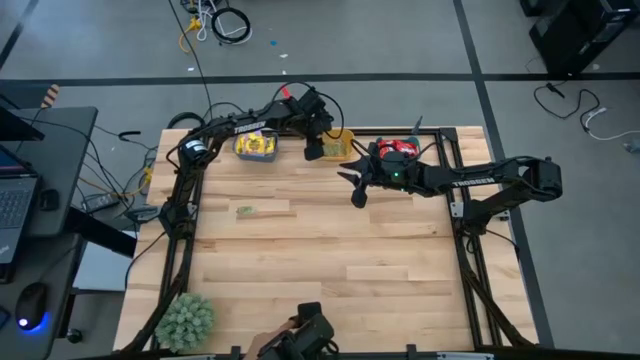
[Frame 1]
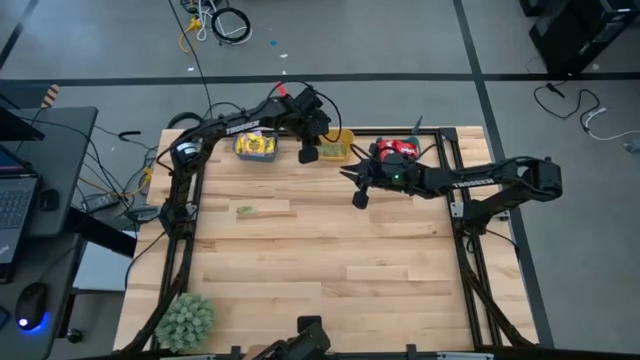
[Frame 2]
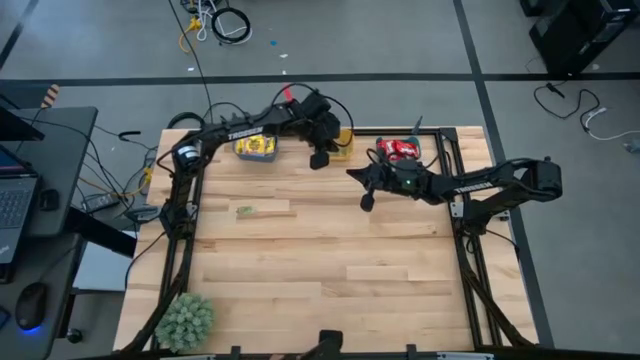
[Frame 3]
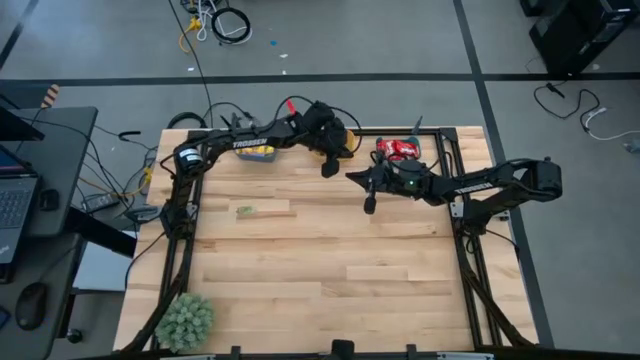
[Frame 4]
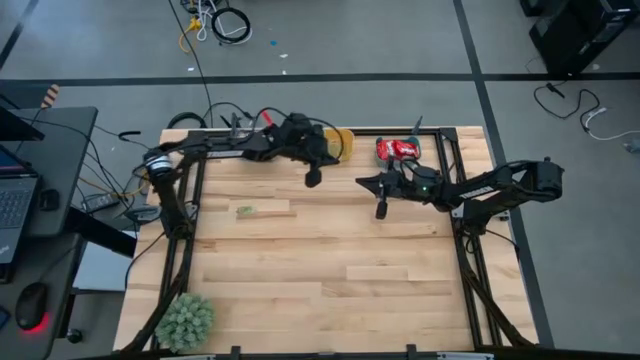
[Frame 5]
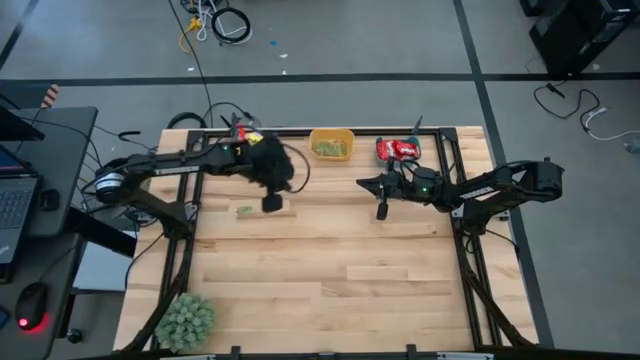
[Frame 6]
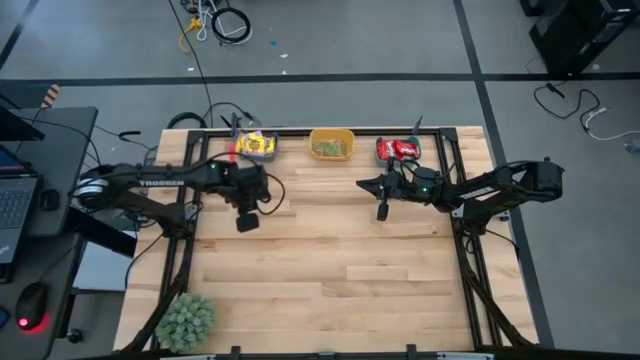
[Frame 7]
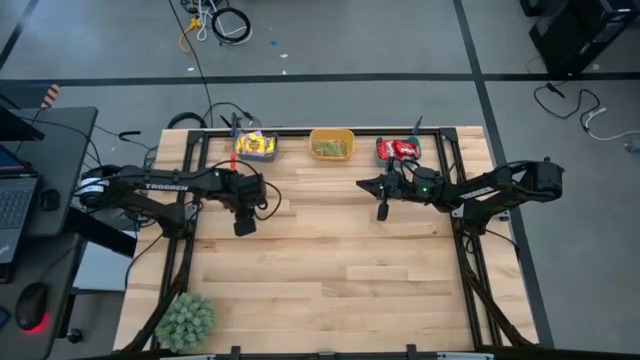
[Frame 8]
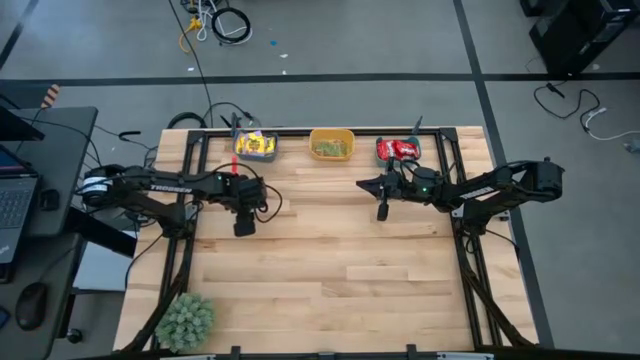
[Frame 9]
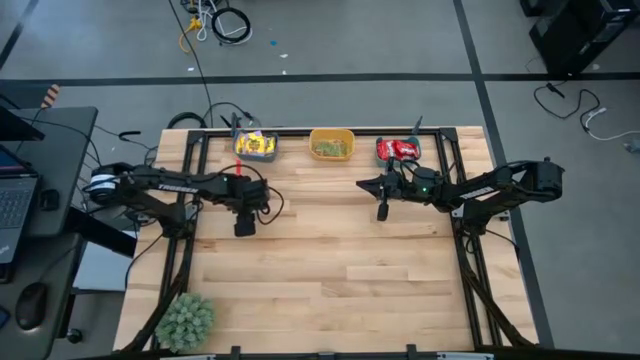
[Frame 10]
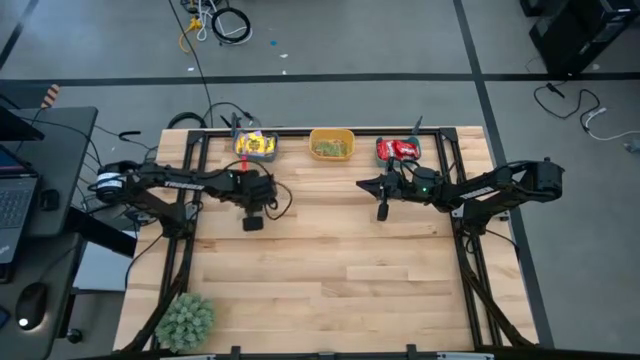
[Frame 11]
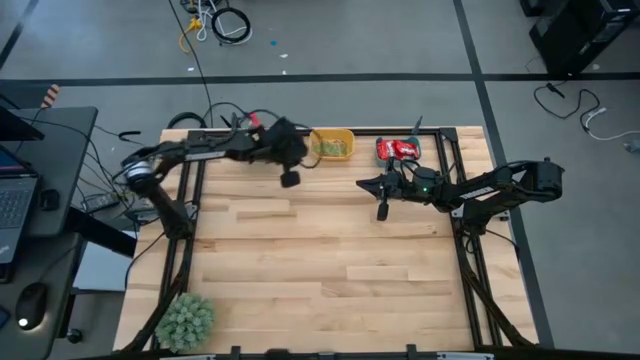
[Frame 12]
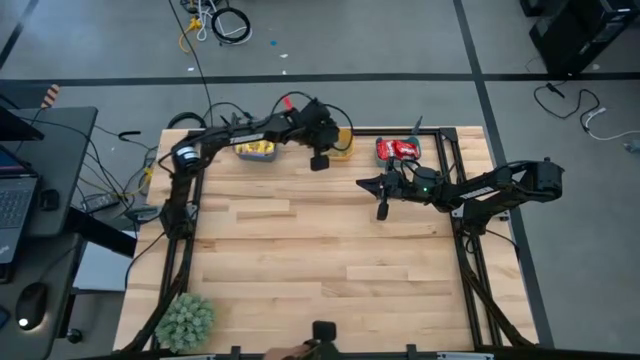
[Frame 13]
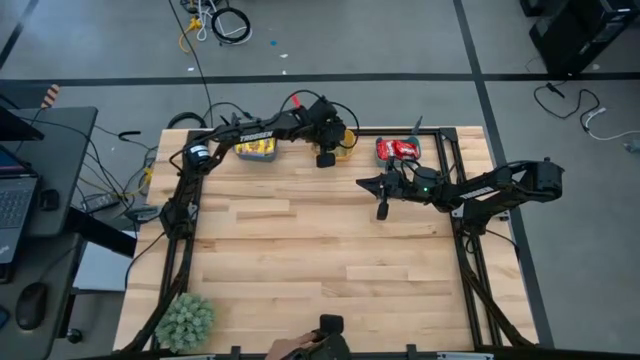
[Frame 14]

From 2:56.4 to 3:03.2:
Task: Sort candy
Put the green gummy into the yellow bin

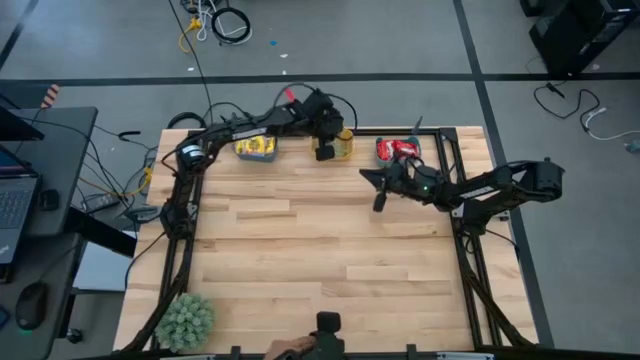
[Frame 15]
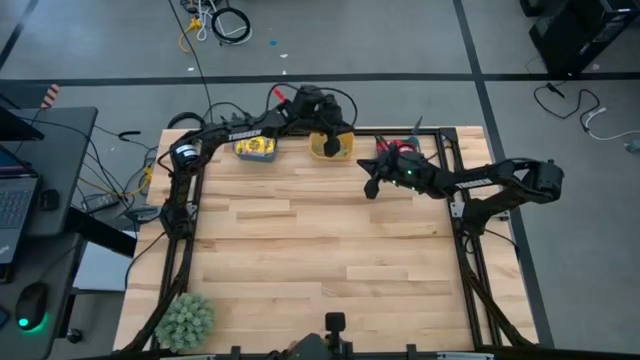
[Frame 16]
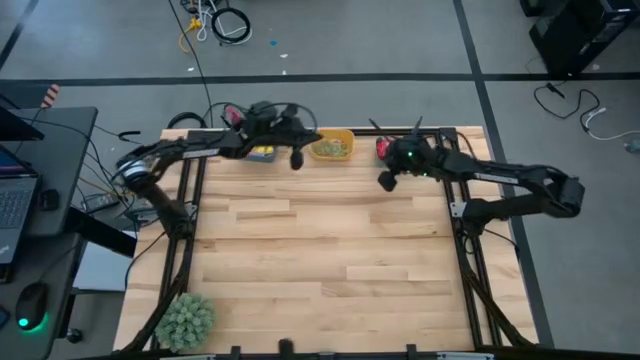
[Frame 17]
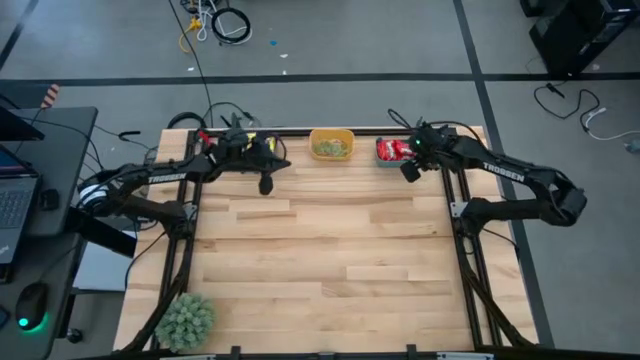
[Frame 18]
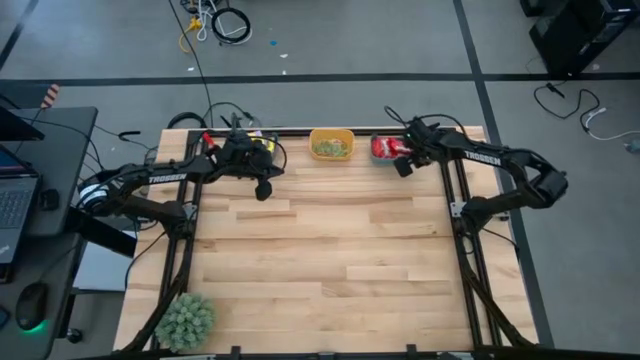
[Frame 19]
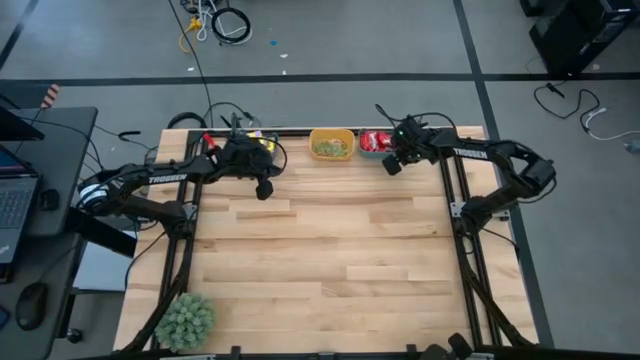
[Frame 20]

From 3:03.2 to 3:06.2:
Adjust the blue bin

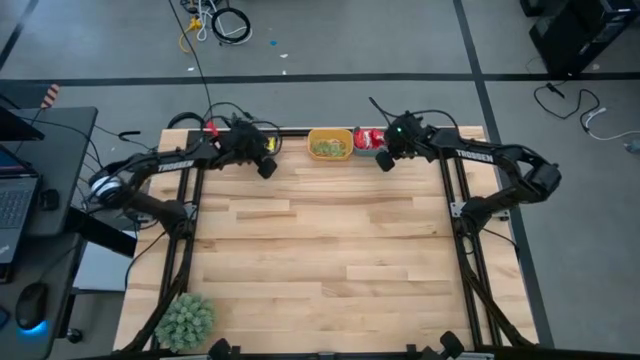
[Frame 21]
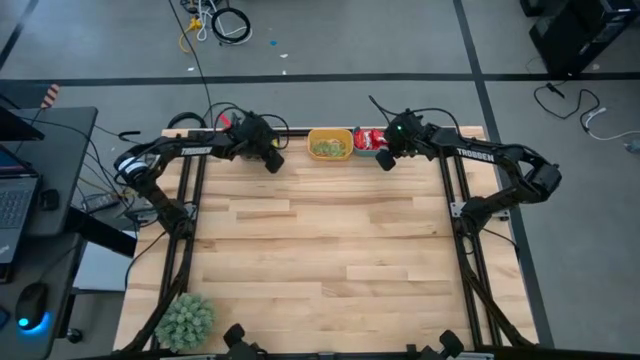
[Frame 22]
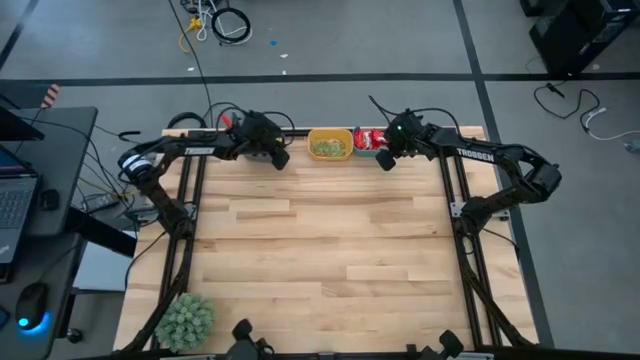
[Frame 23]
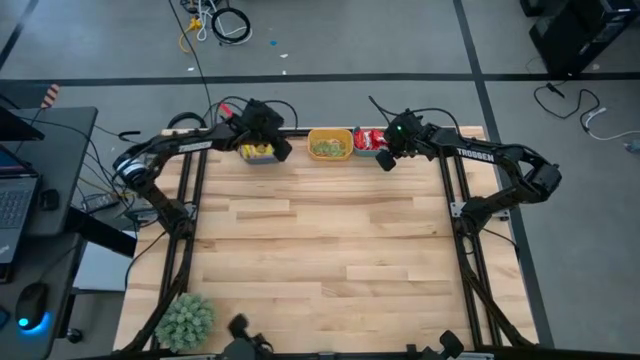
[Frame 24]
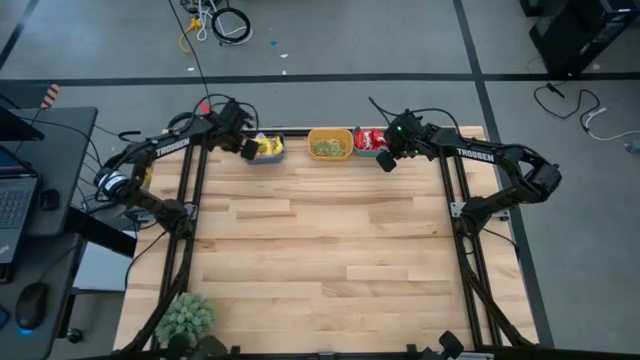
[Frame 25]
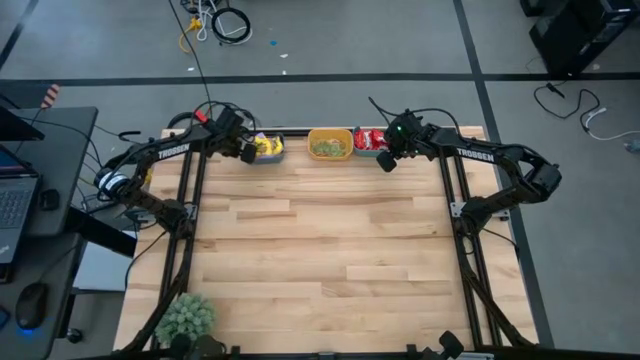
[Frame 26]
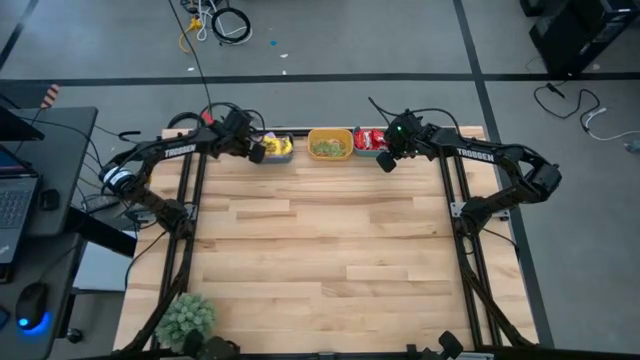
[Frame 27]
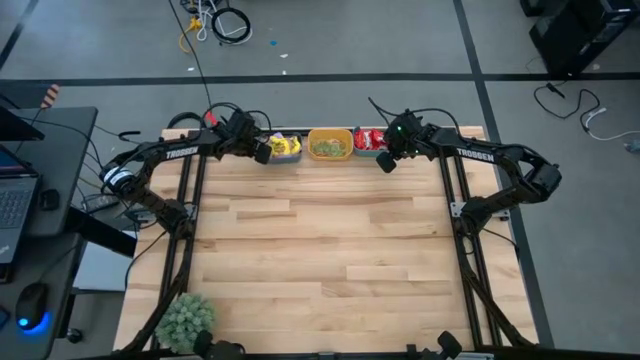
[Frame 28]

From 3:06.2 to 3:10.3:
Adjust the dark blue bin

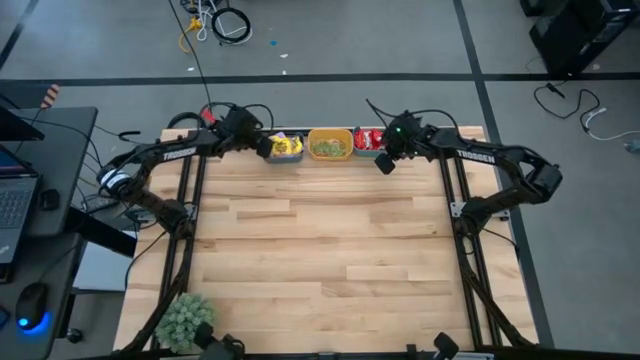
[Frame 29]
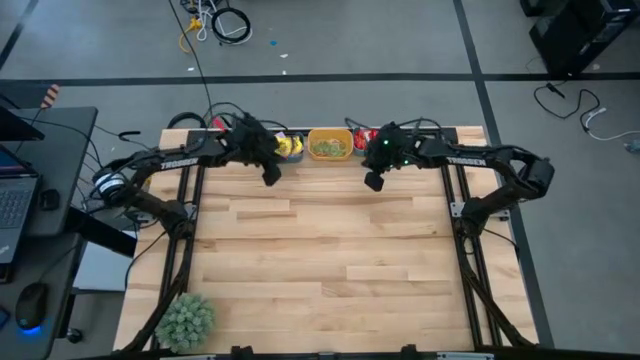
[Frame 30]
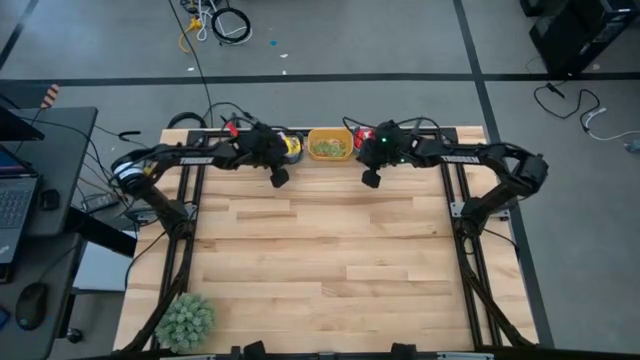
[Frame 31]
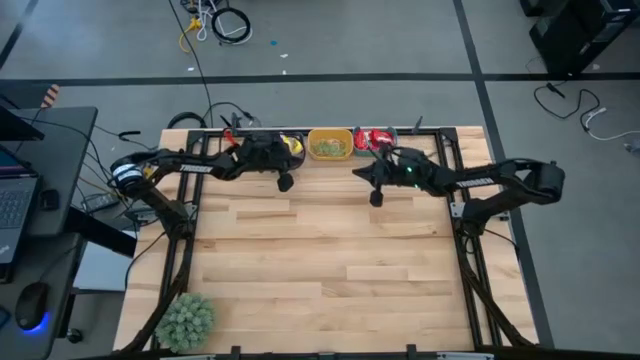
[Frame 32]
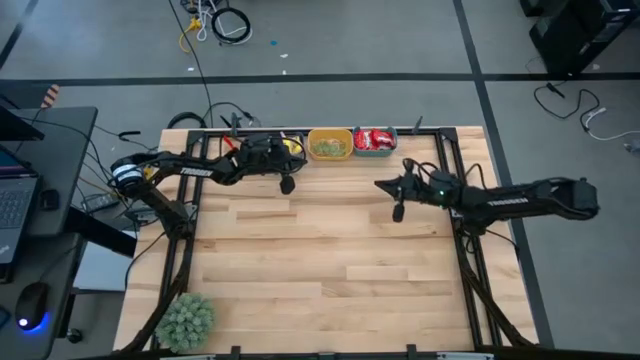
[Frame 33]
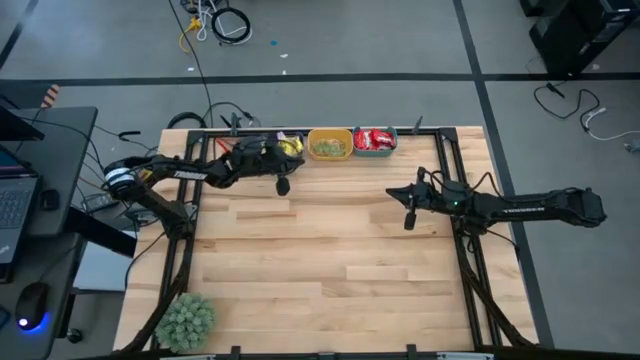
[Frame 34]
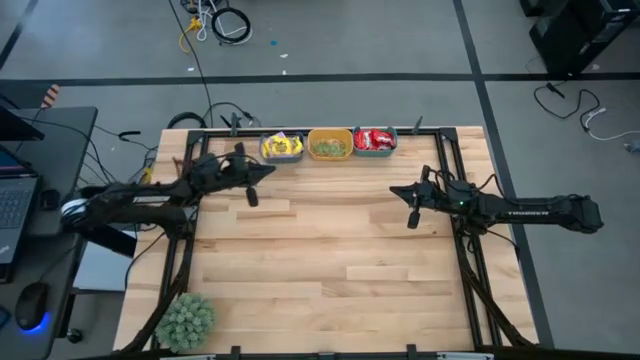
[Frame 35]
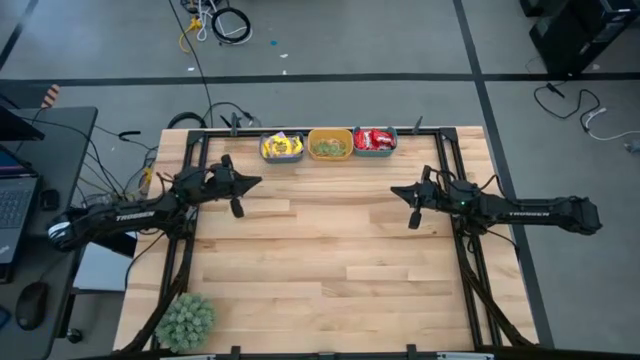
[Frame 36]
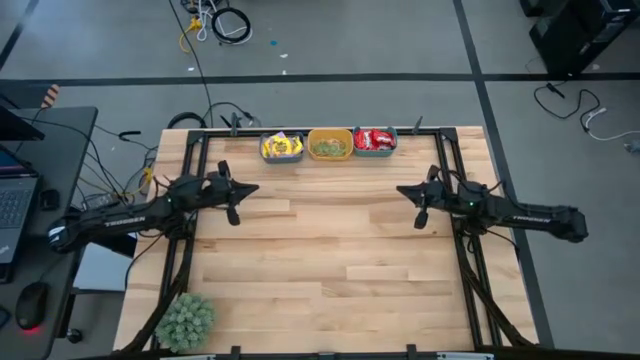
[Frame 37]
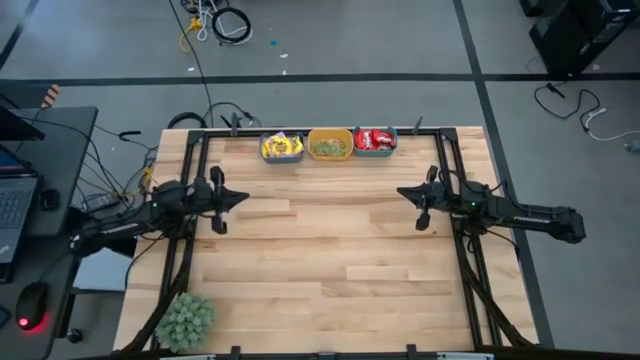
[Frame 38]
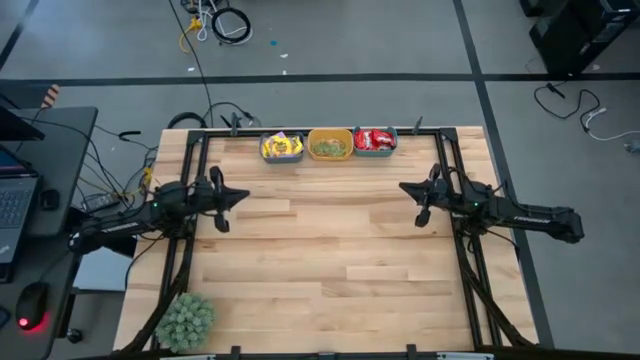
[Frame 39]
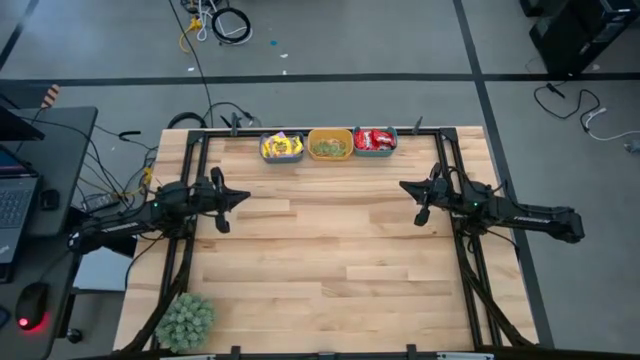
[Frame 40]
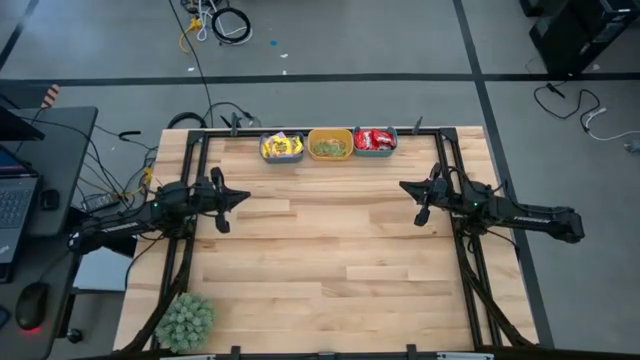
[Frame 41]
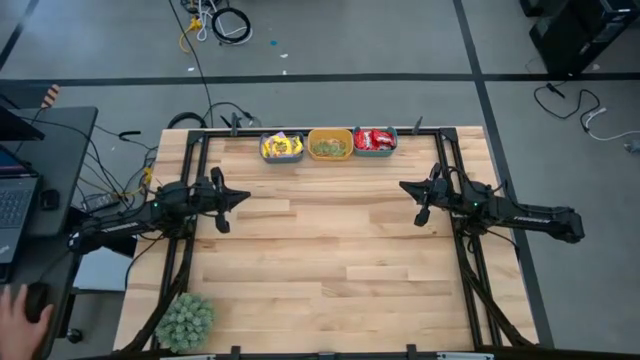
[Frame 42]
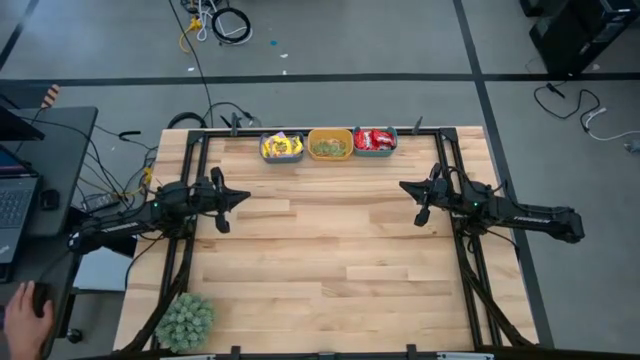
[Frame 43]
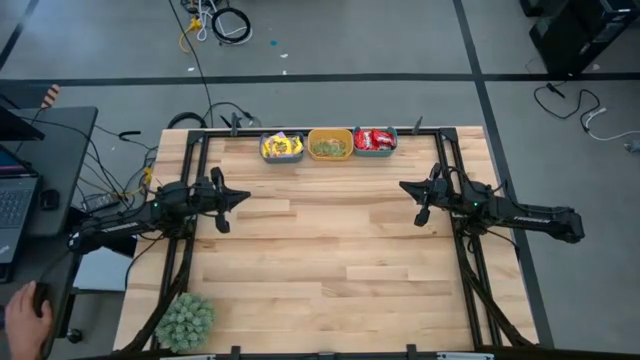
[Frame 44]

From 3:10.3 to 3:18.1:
Return to Home Position
